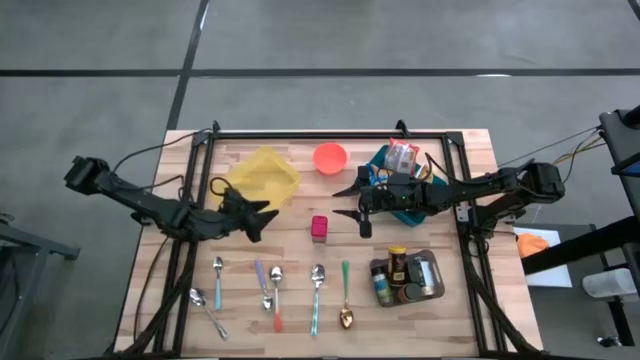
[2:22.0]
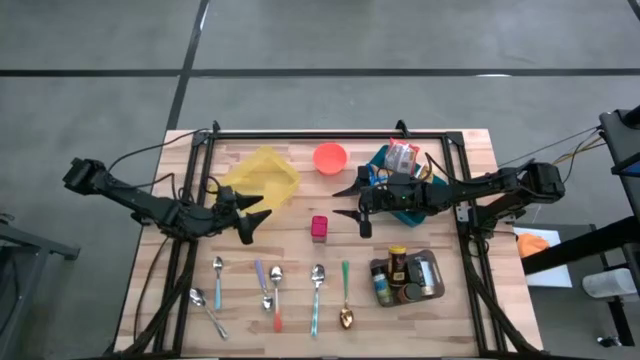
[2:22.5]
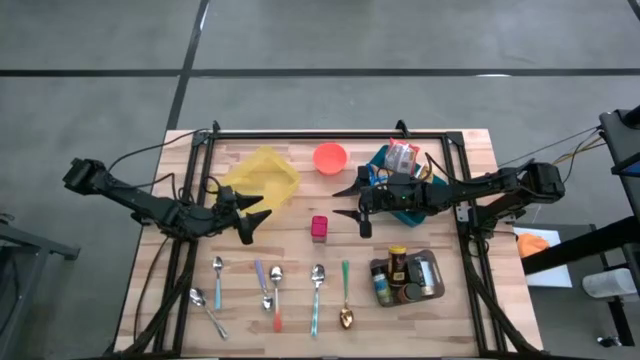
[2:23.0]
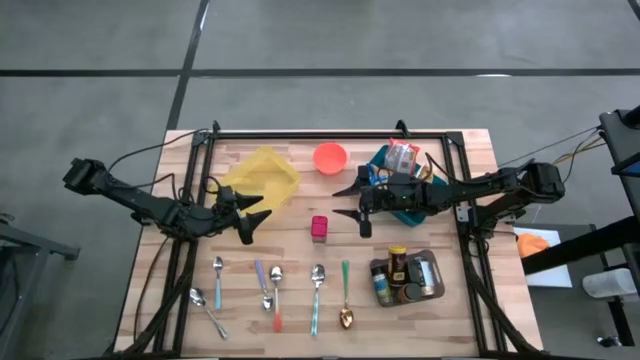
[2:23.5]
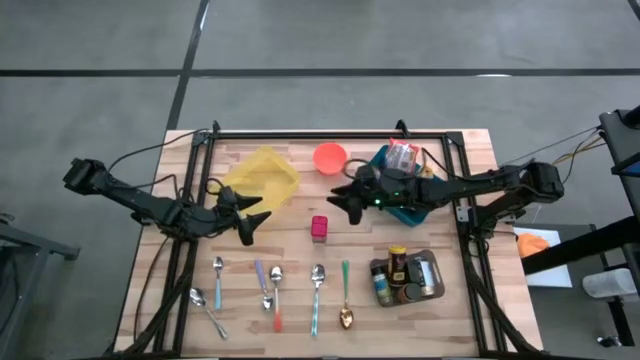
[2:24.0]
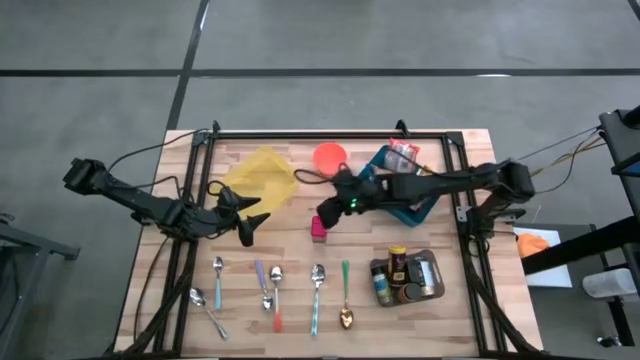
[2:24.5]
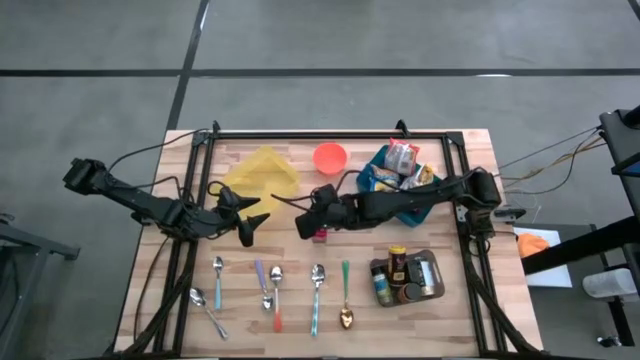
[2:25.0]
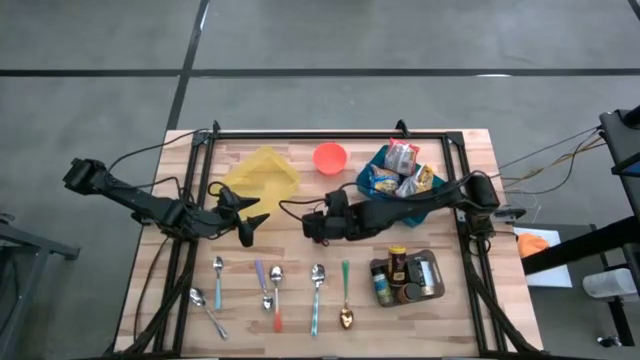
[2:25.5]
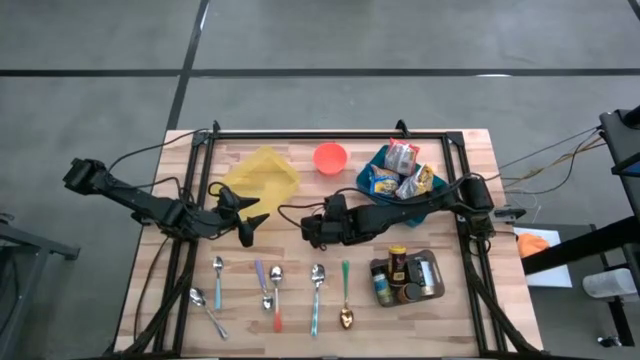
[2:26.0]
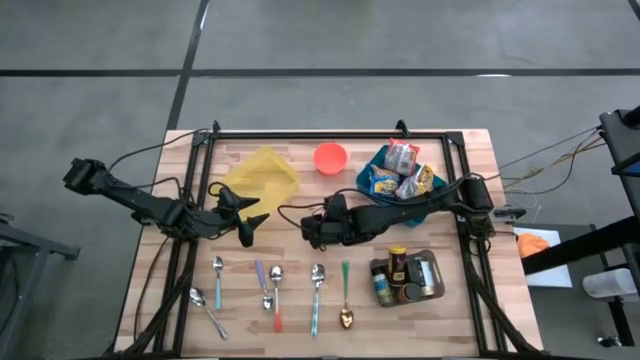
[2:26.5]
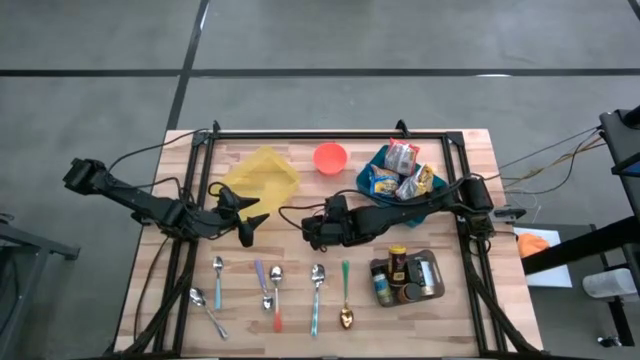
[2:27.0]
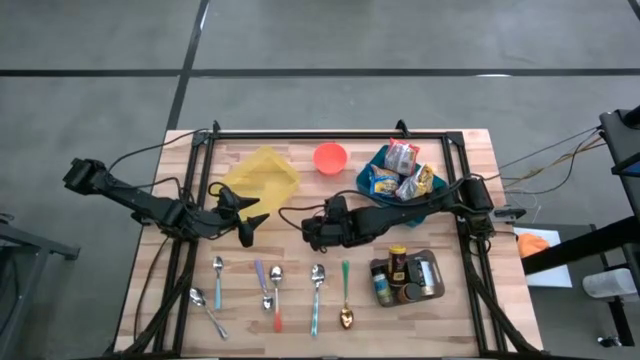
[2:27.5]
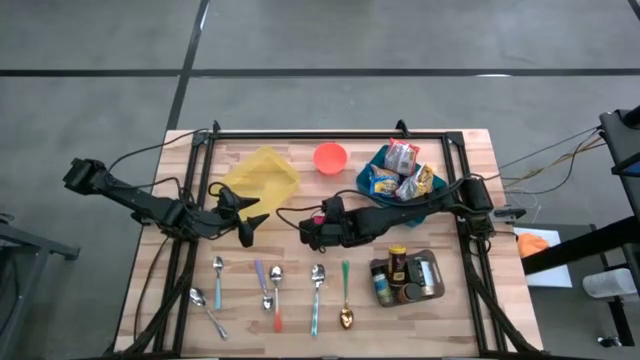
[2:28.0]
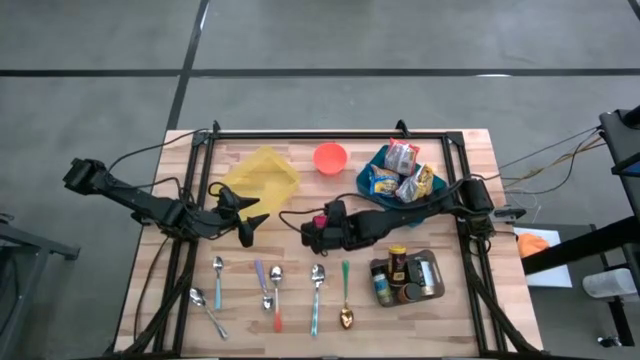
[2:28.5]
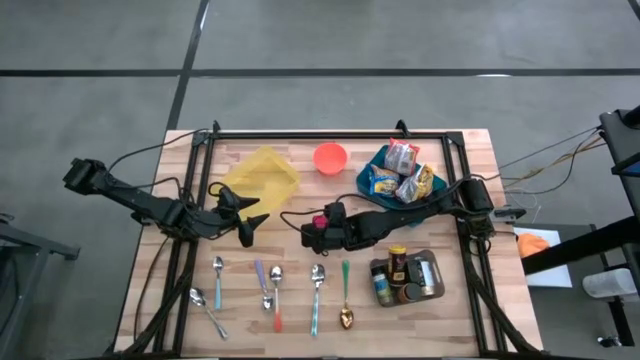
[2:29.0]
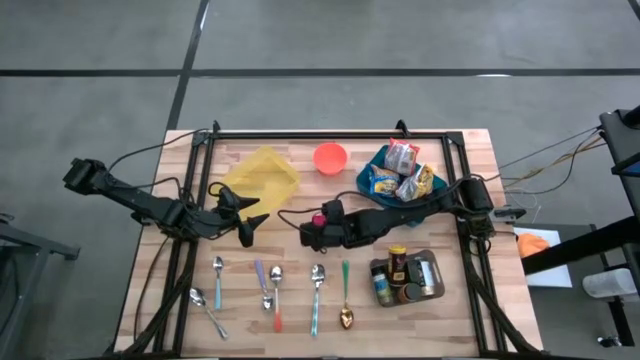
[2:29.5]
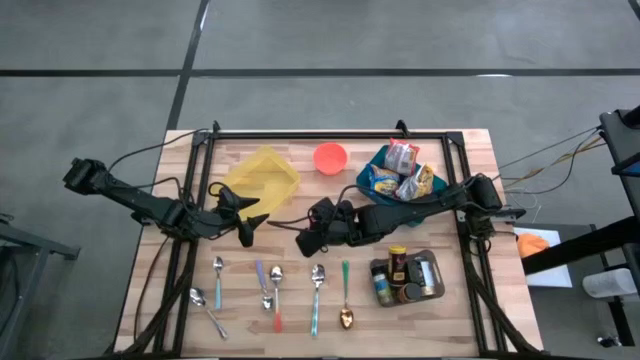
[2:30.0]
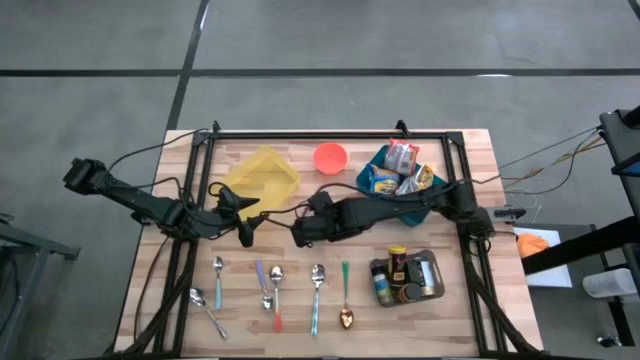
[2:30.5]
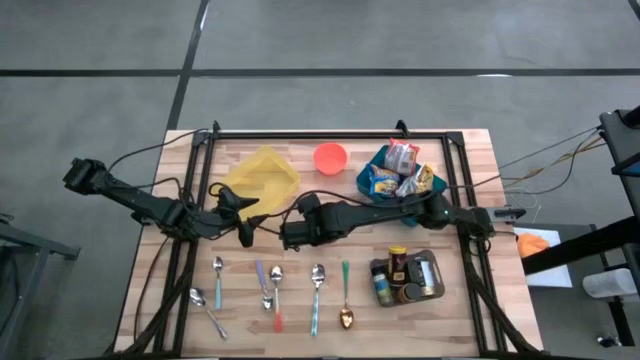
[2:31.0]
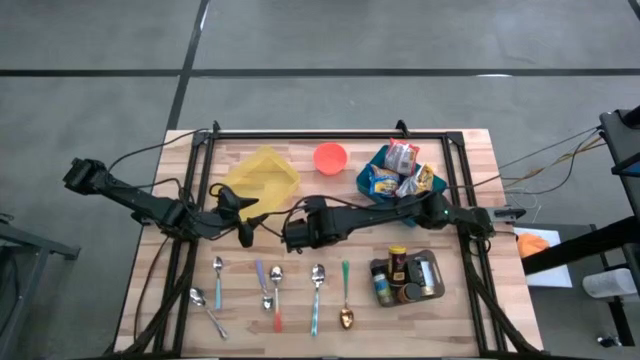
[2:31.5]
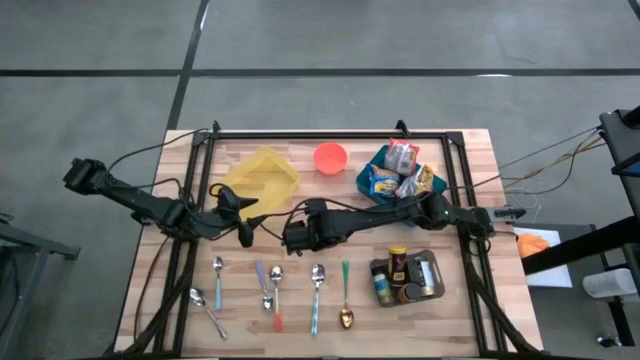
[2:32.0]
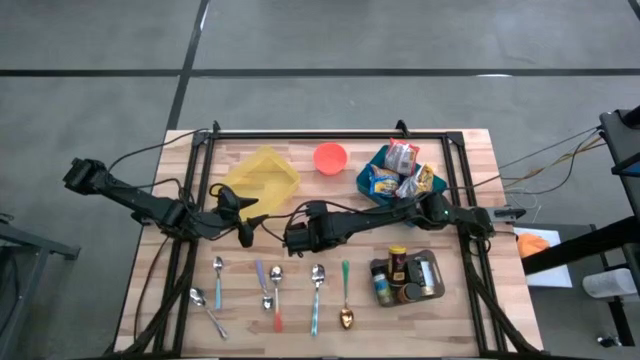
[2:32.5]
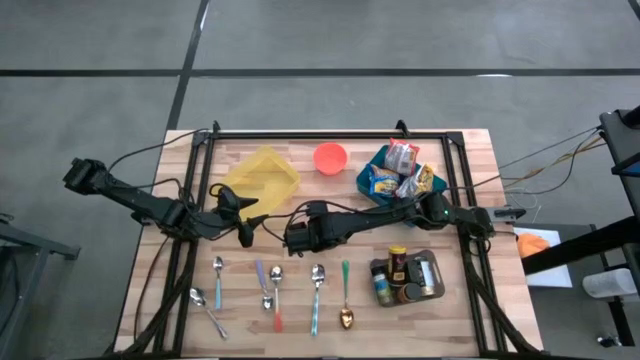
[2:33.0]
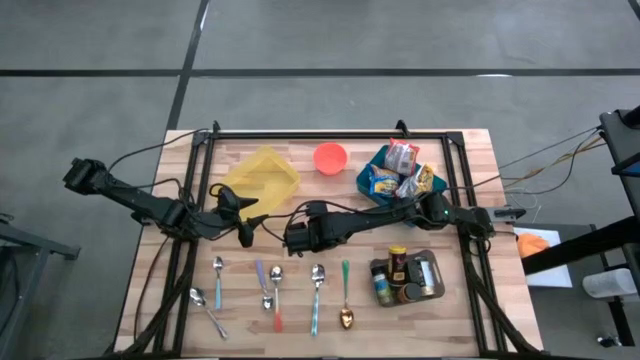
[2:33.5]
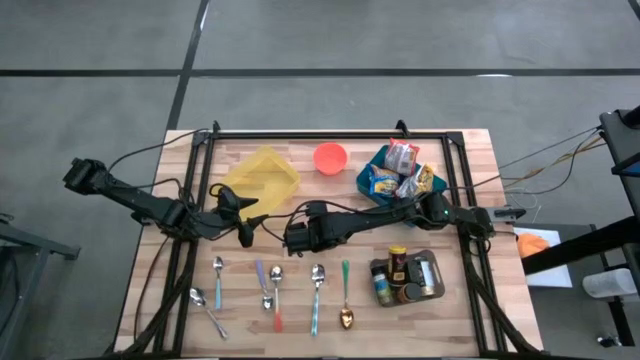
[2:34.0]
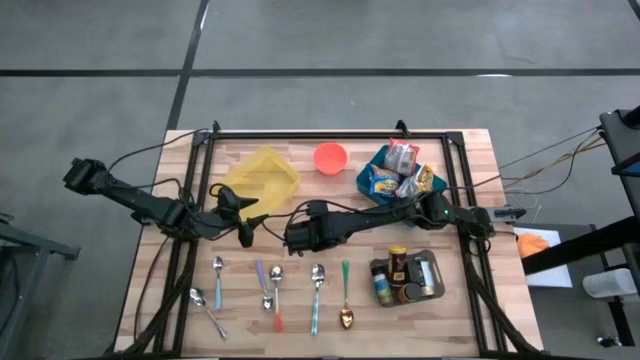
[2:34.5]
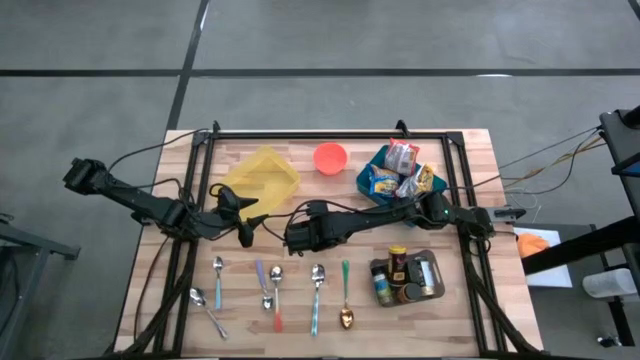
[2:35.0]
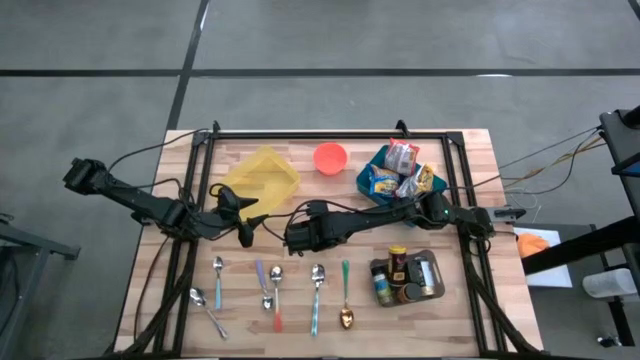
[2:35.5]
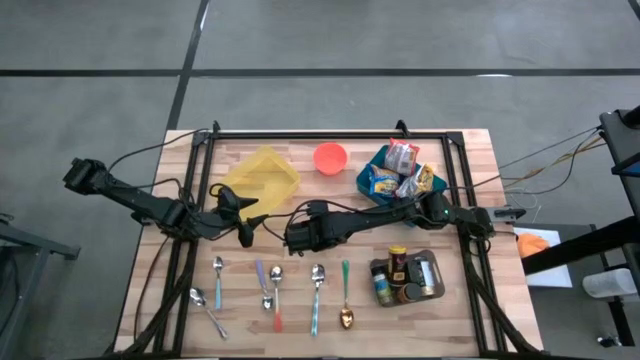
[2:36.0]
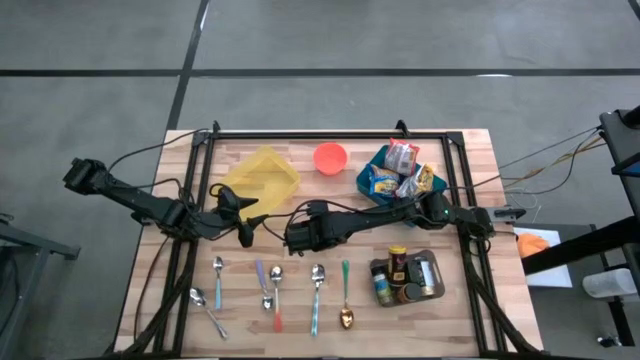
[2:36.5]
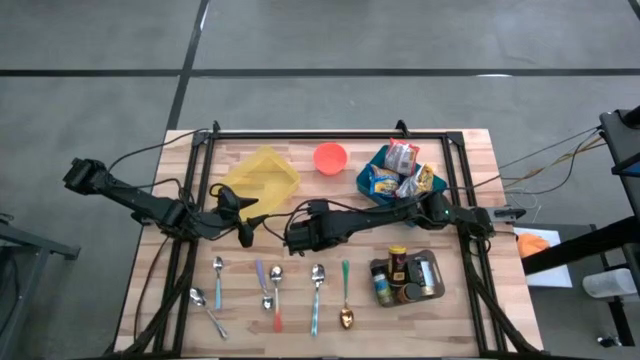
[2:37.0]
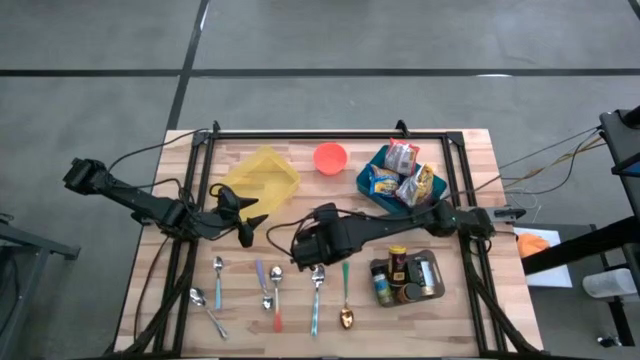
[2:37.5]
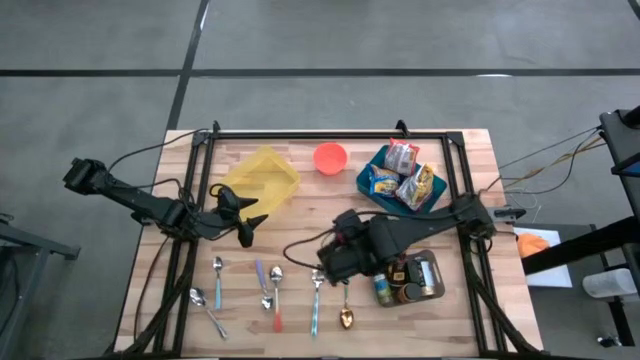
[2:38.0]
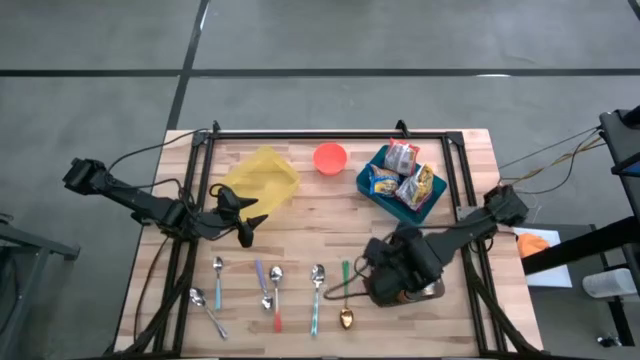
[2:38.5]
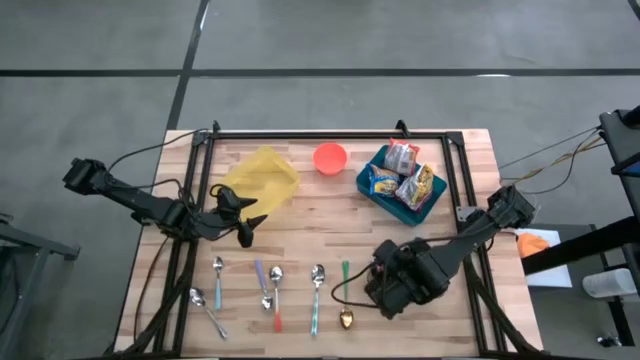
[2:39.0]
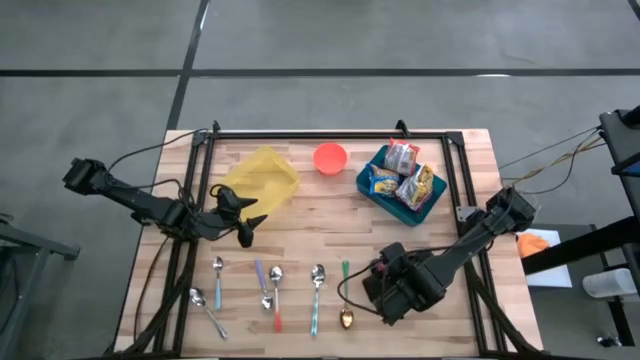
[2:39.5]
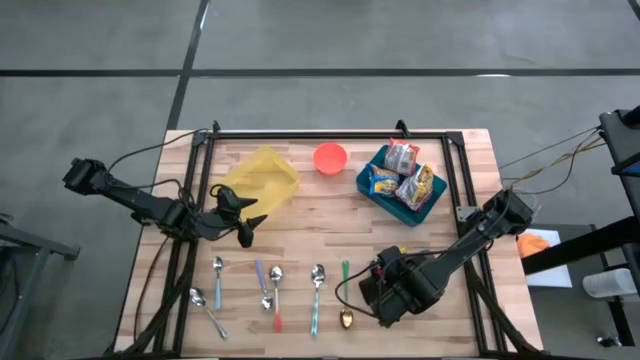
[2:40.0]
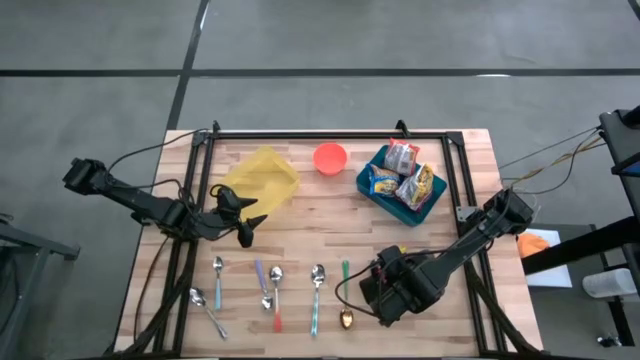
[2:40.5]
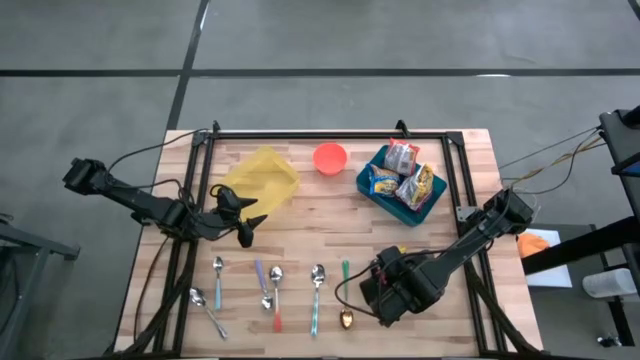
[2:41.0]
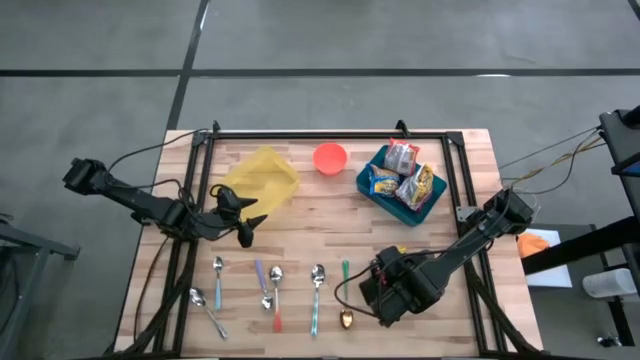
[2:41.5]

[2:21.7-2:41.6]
Put the red seasoning can into the black bin
